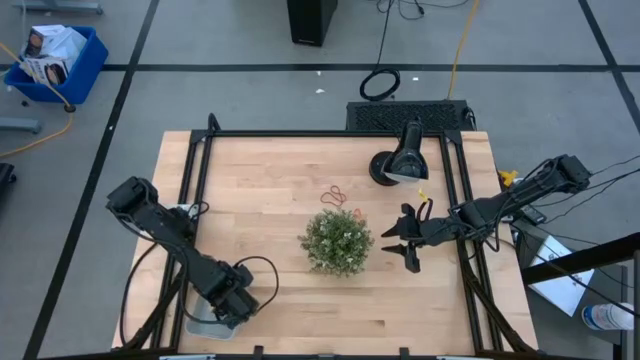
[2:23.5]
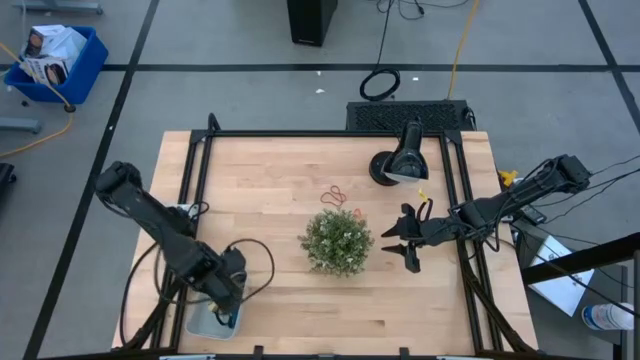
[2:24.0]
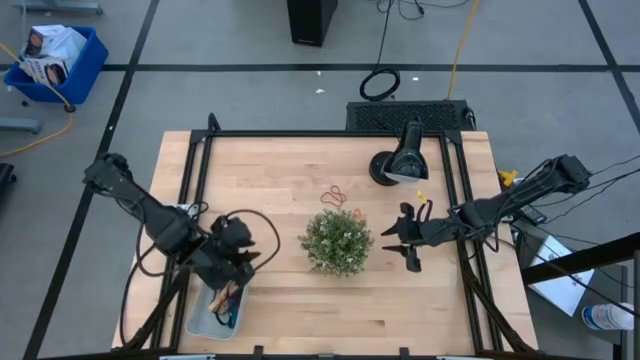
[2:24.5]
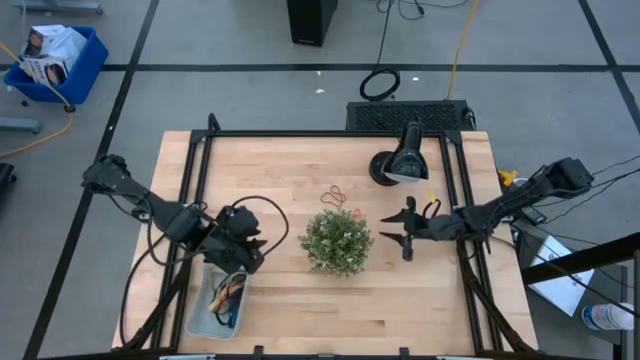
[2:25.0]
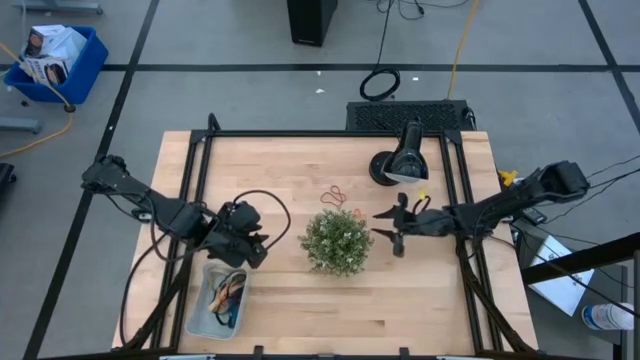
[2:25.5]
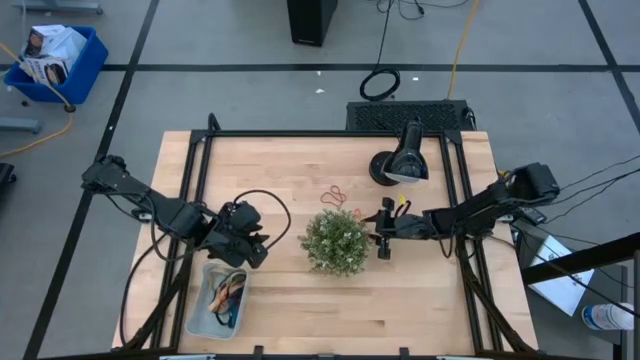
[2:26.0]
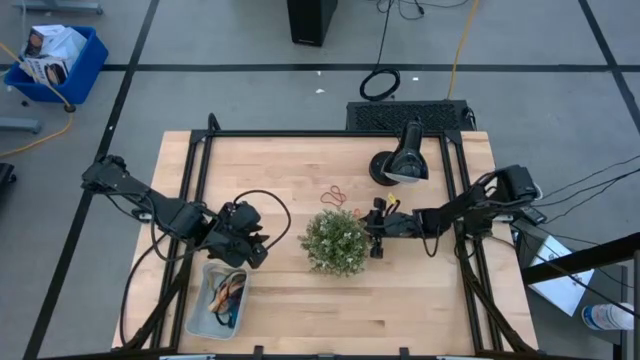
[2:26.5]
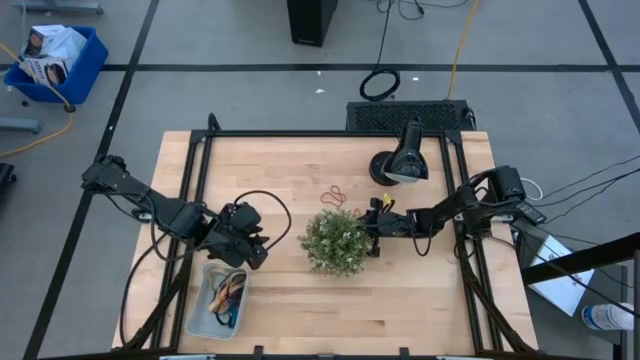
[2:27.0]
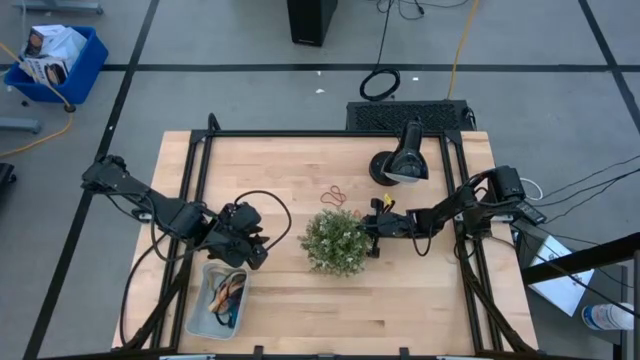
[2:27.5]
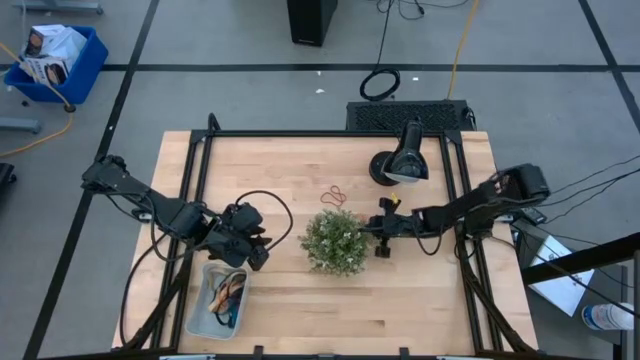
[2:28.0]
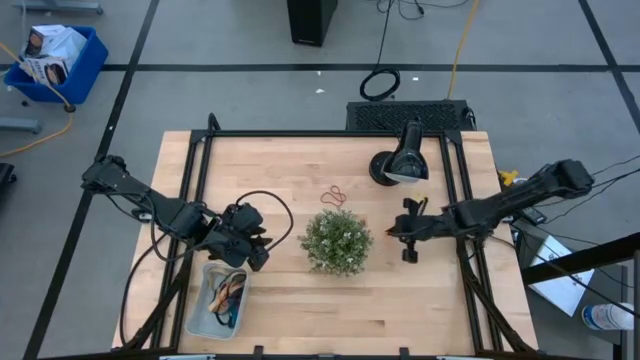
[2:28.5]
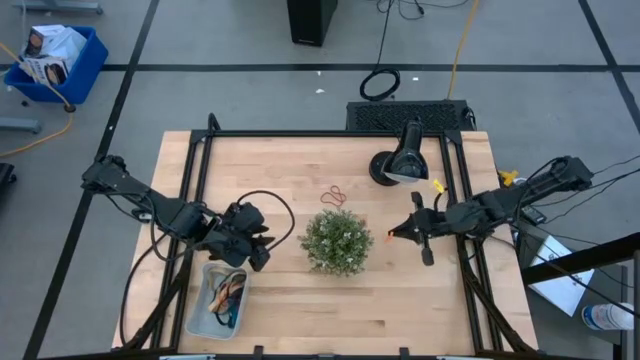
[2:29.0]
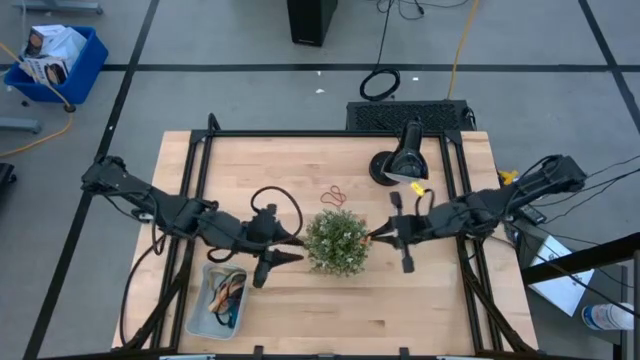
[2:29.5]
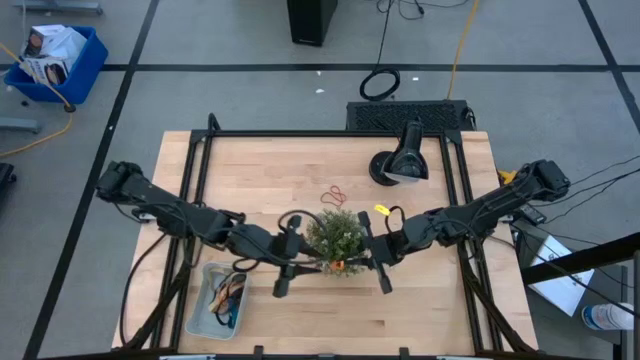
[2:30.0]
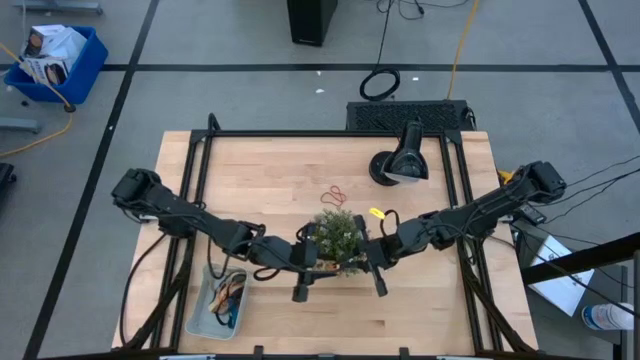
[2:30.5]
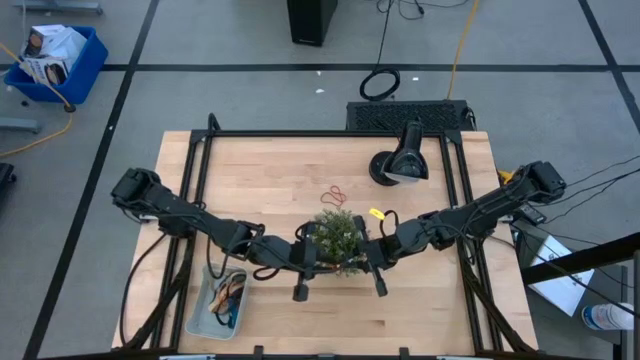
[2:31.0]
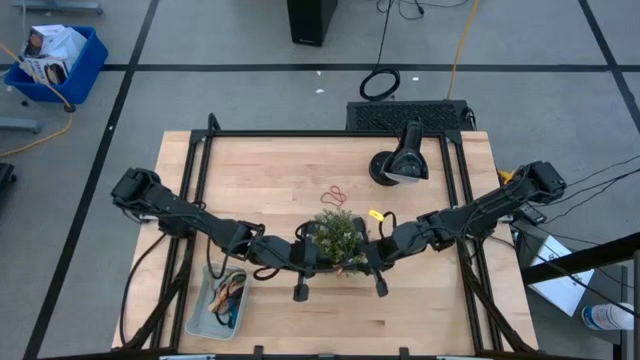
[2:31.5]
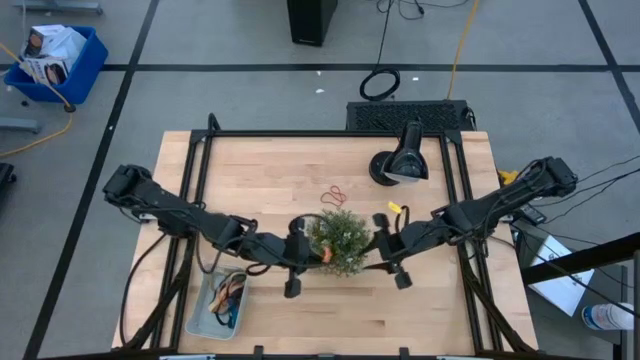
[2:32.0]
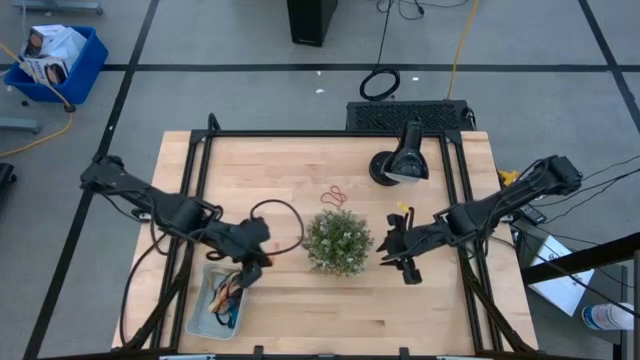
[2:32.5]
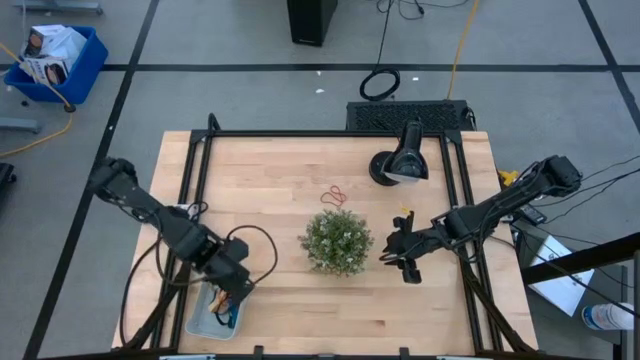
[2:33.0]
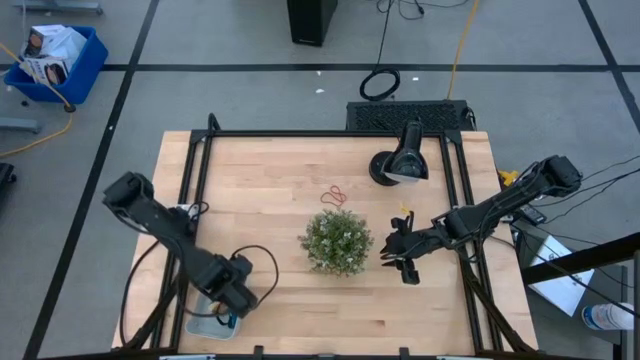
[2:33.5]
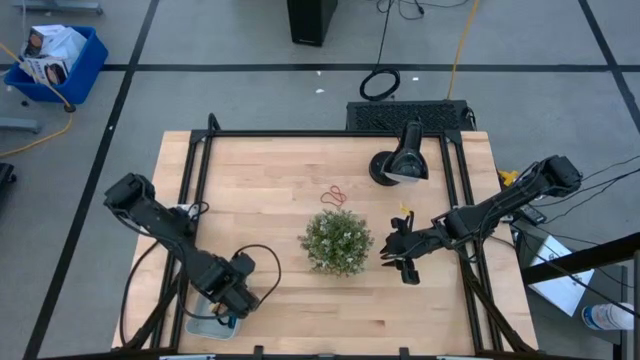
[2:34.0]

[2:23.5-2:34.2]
Task: Pick and place rubber bands into bin
Put the orange rubber band into the blue bin

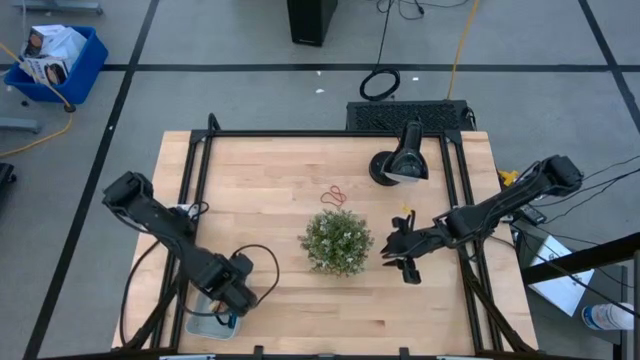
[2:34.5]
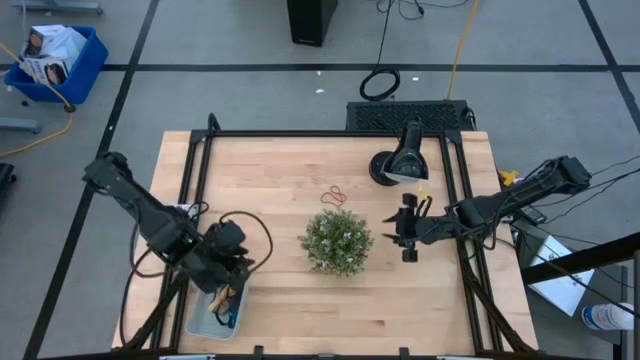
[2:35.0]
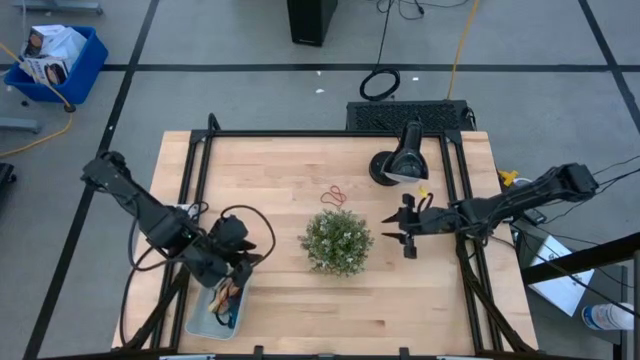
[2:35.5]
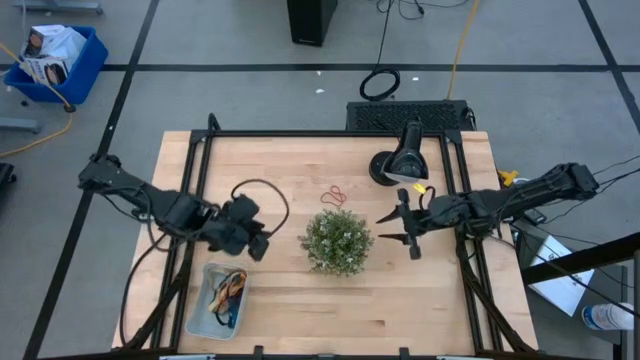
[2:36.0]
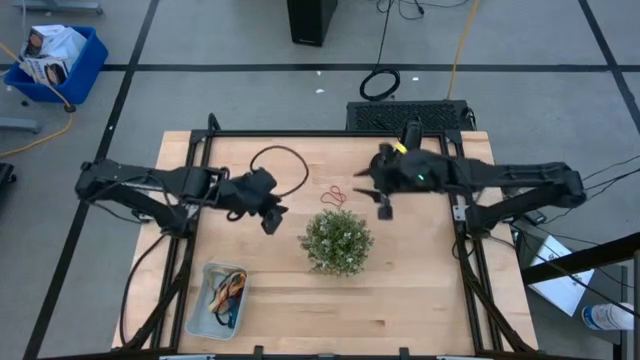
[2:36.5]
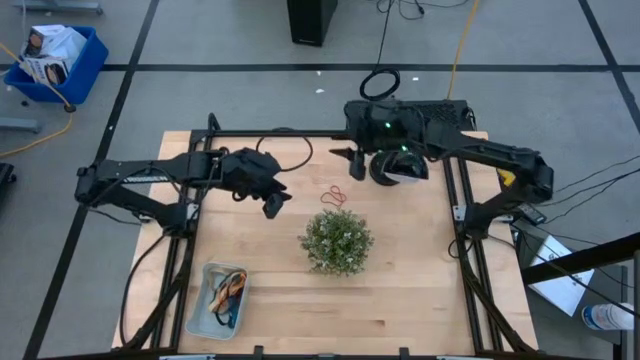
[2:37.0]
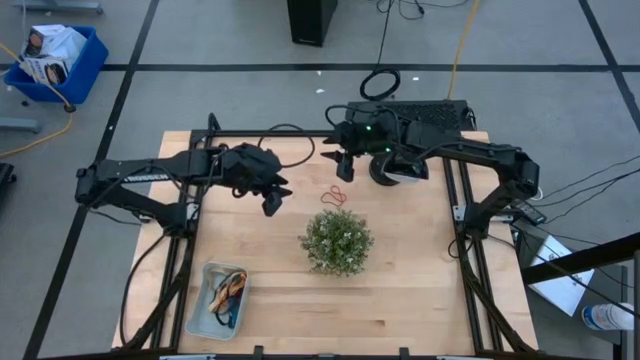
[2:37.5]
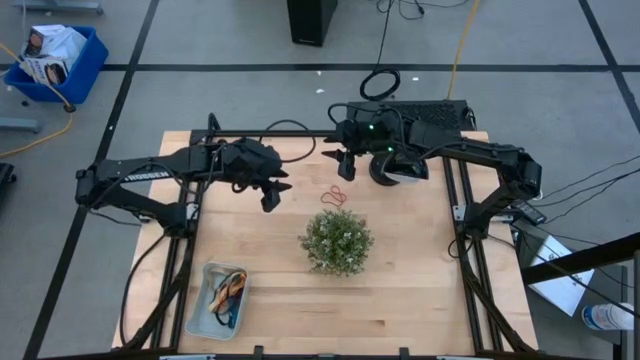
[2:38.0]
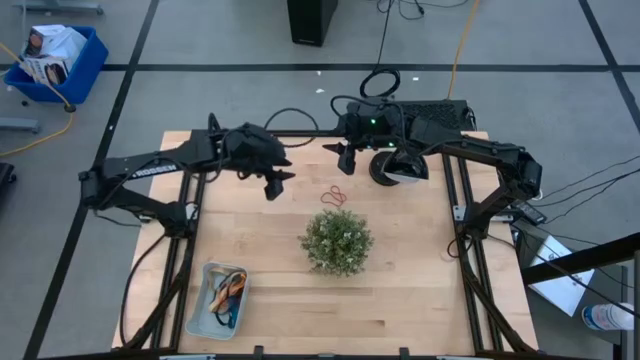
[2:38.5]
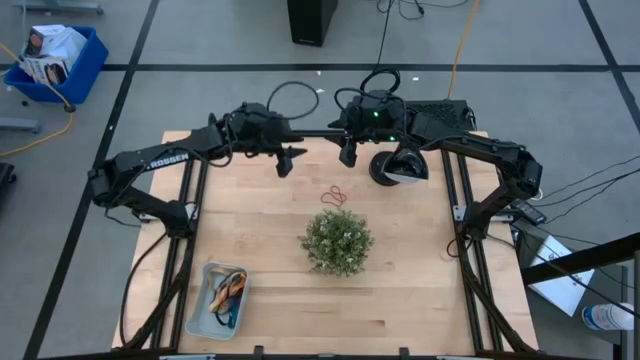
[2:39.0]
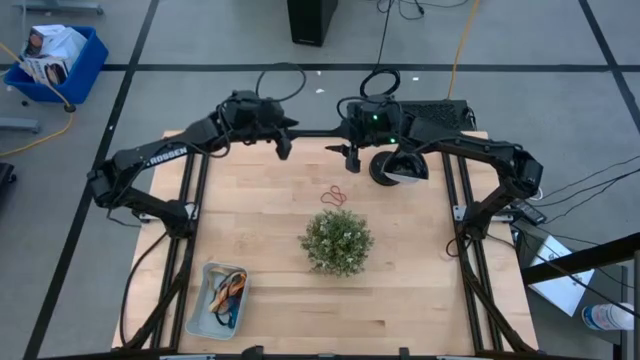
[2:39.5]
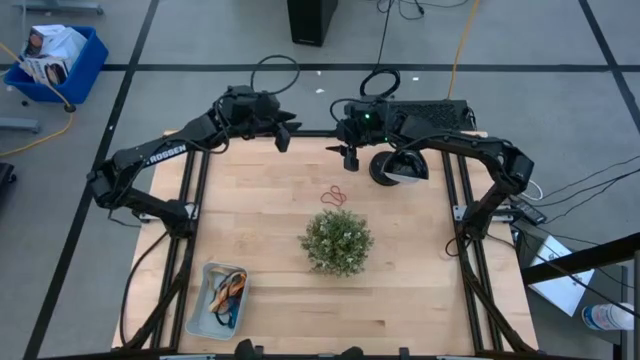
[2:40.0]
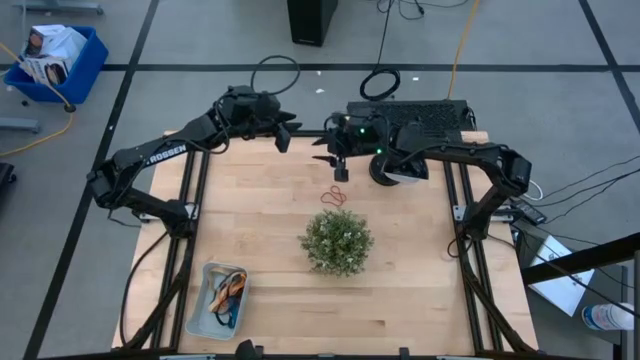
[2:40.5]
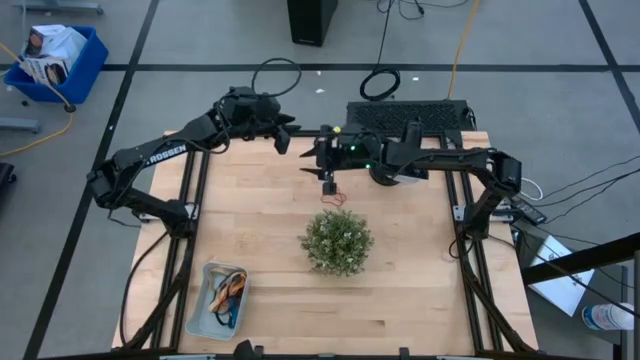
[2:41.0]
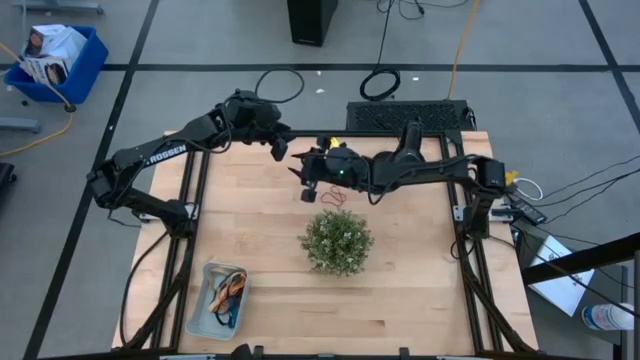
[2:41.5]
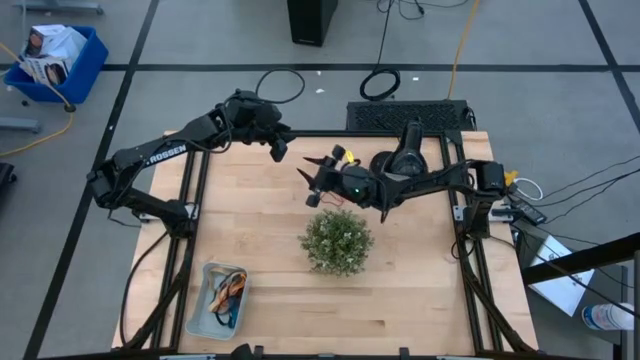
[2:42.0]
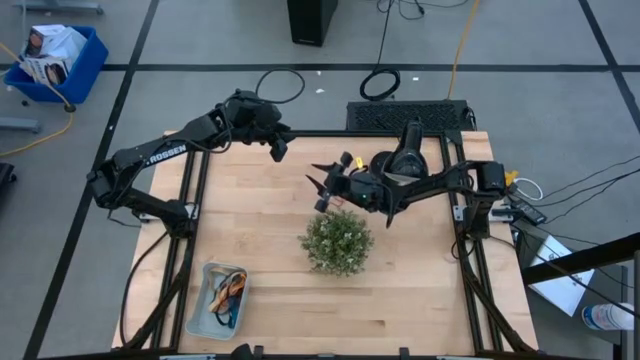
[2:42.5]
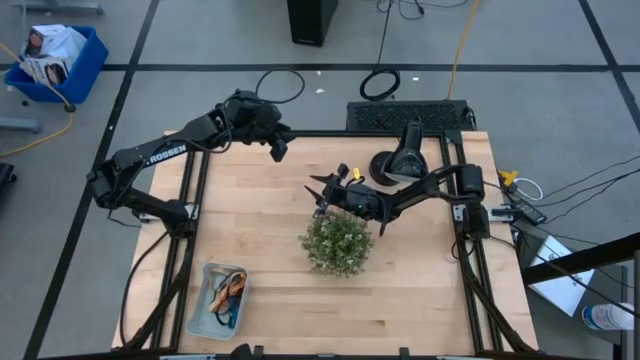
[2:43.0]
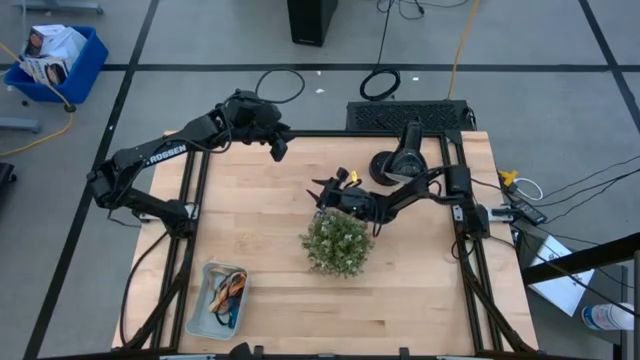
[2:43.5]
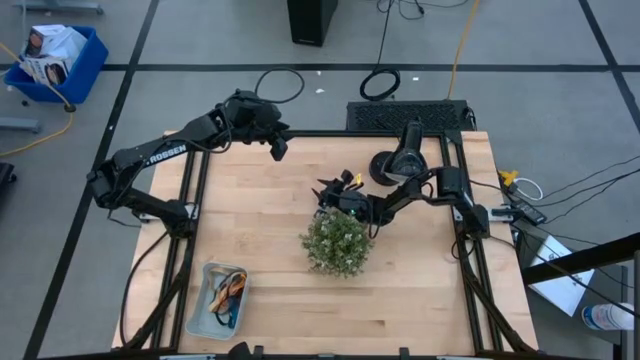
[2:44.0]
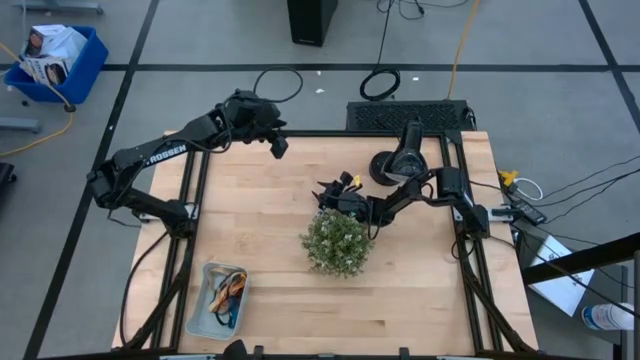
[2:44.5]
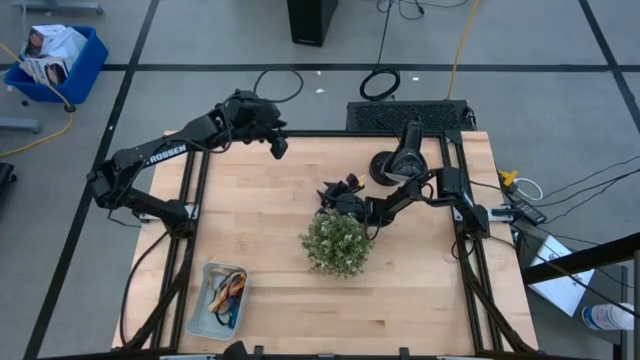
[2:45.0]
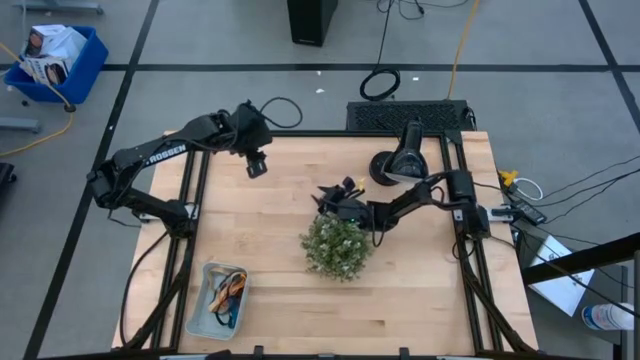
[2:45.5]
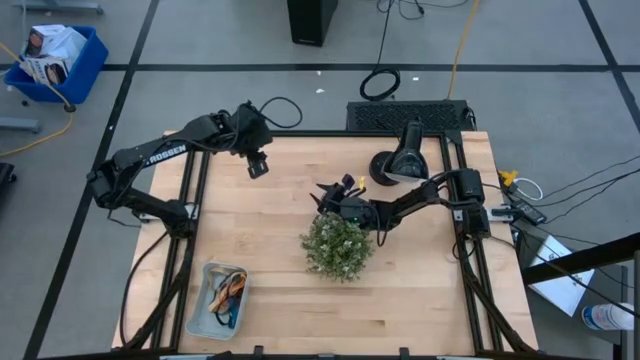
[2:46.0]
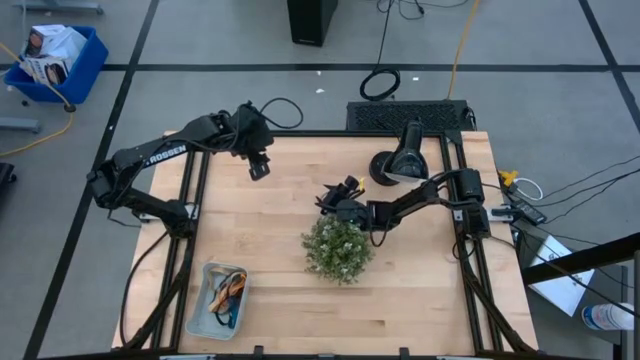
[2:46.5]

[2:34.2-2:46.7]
Put the red rubber band into the blue bin
